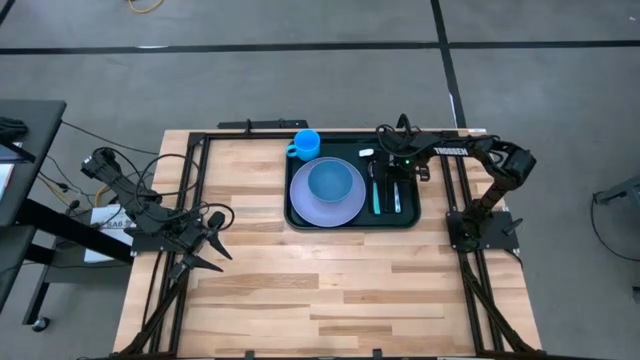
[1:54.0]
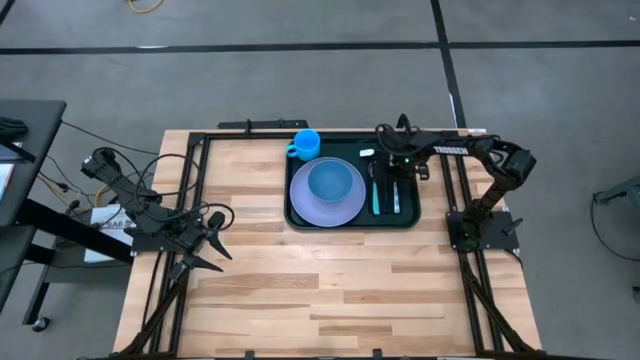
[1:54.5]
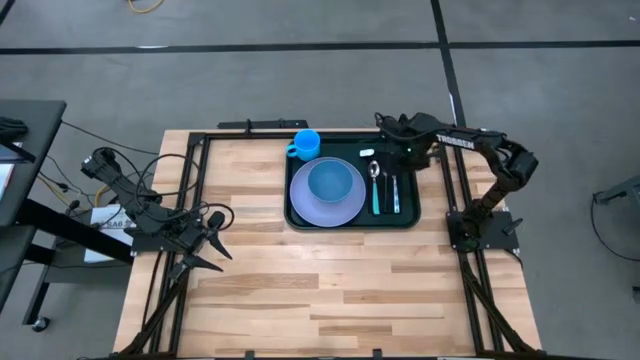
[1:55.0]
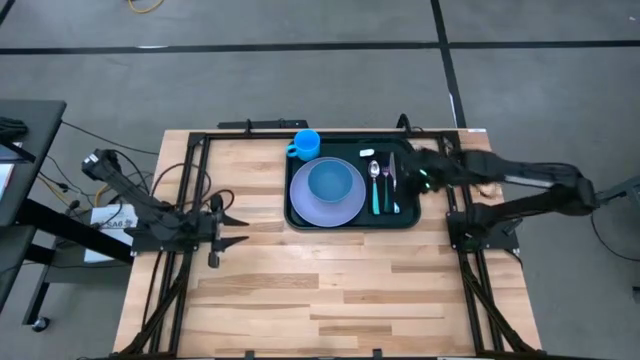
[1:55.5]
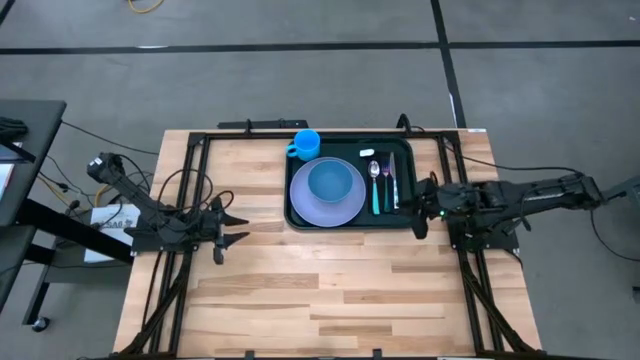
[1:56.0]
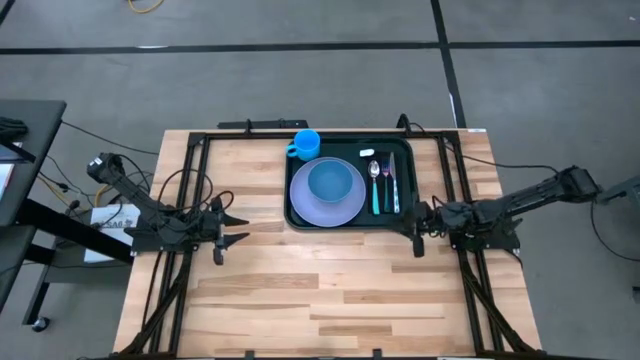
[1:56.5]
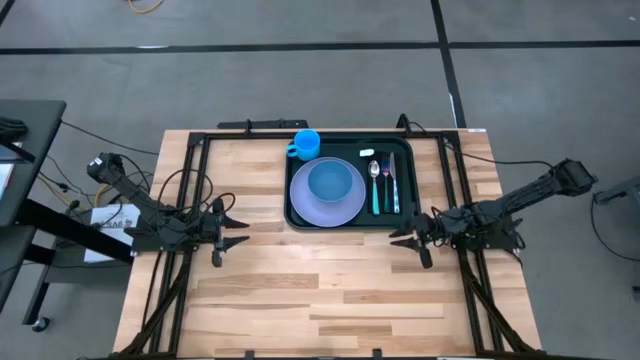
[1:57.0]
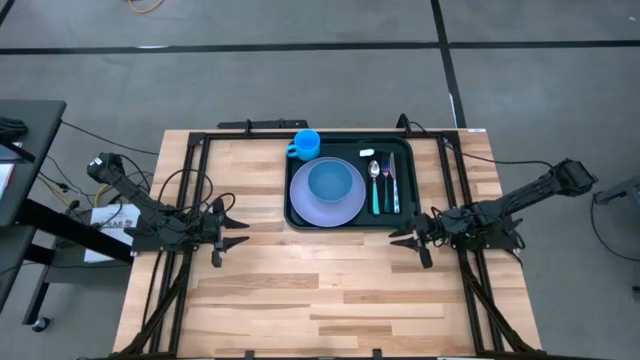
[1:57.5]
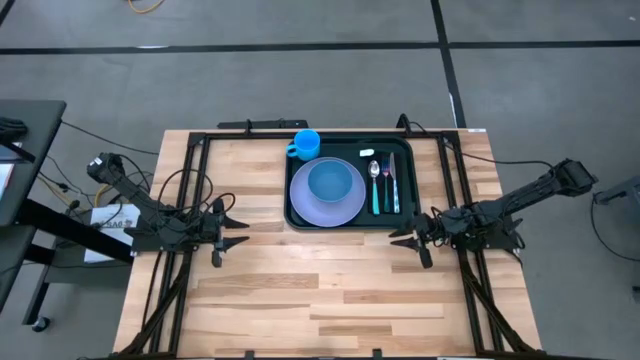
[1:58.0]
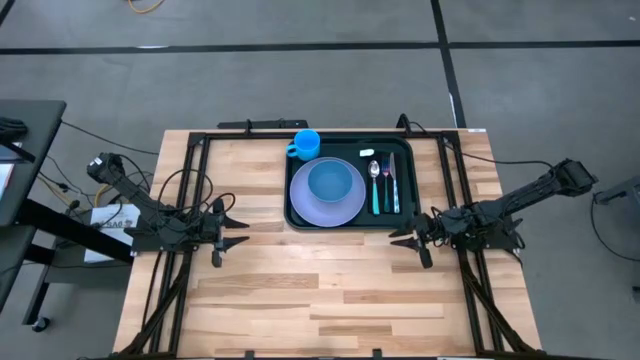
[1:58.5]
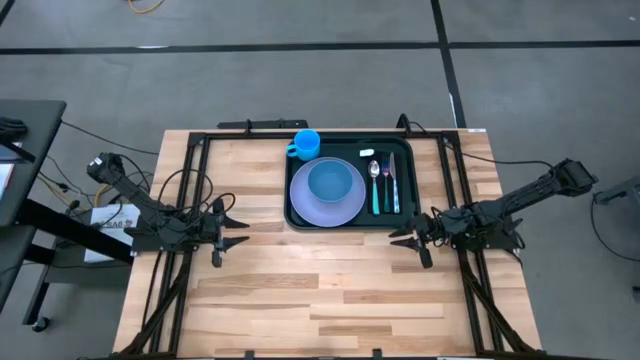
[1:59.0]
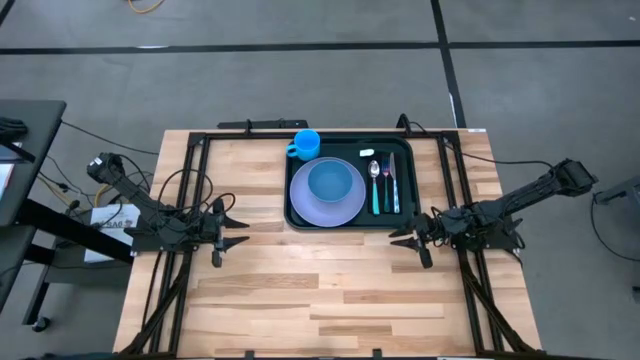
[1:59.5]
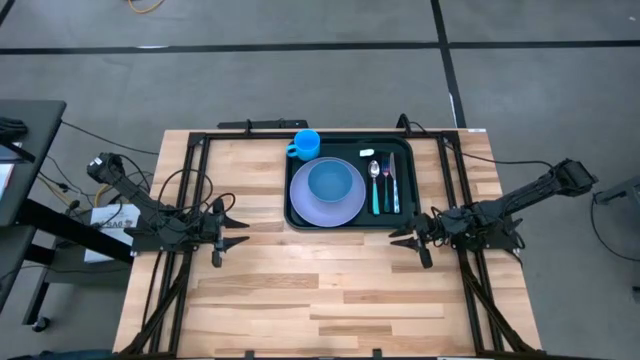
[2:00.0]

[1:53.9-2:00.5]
Task: Set up tray
Return to Home Position

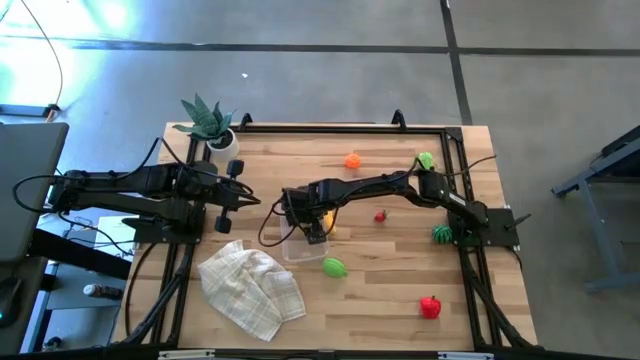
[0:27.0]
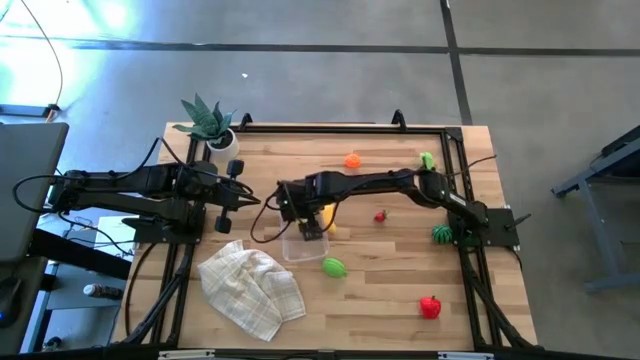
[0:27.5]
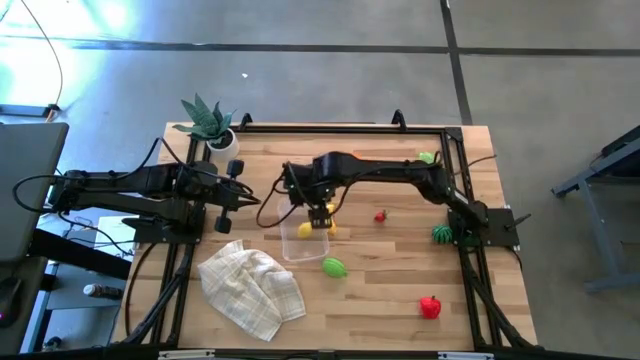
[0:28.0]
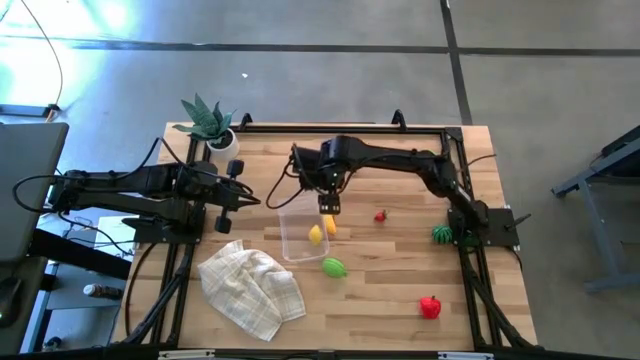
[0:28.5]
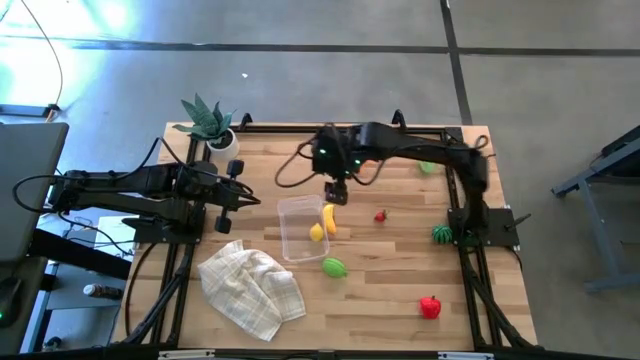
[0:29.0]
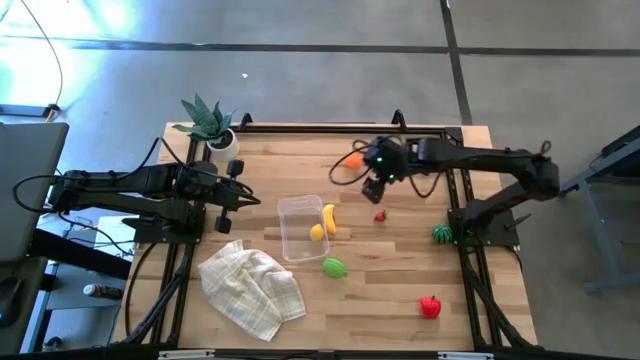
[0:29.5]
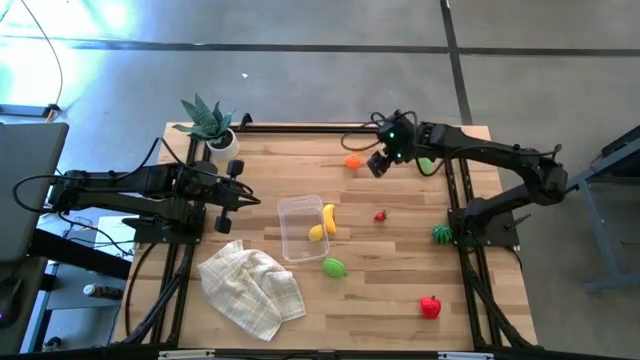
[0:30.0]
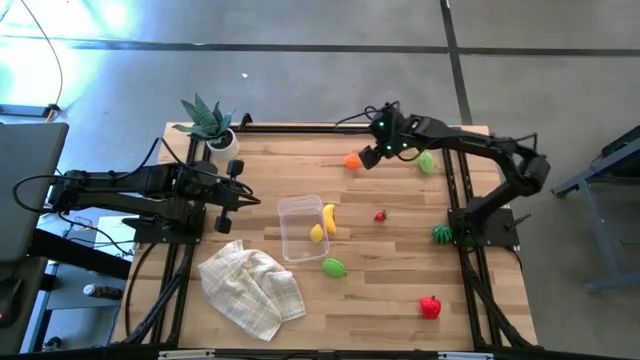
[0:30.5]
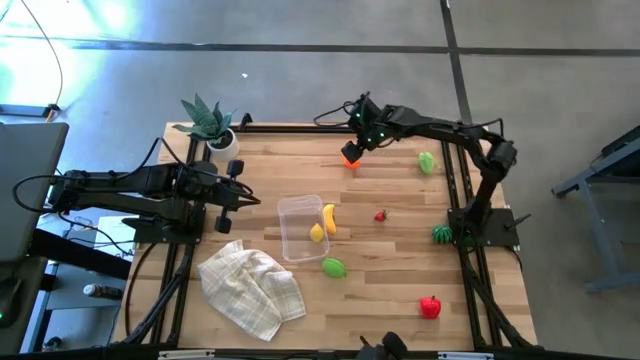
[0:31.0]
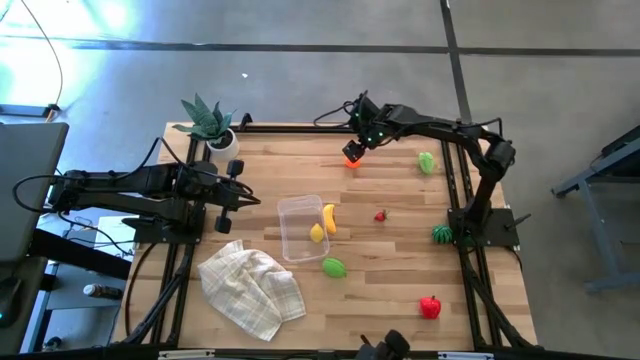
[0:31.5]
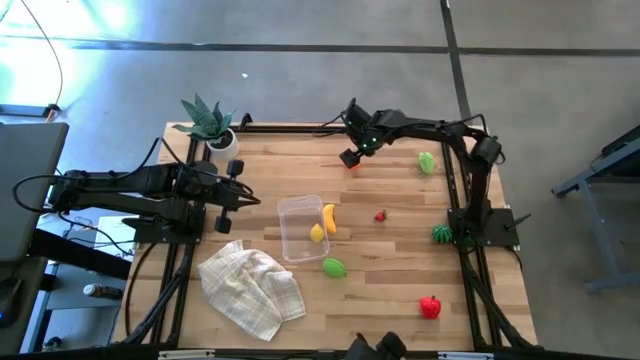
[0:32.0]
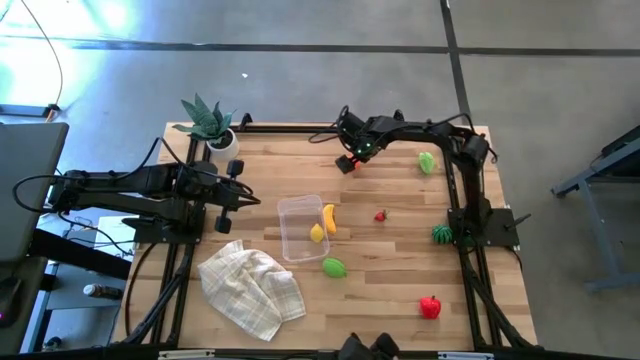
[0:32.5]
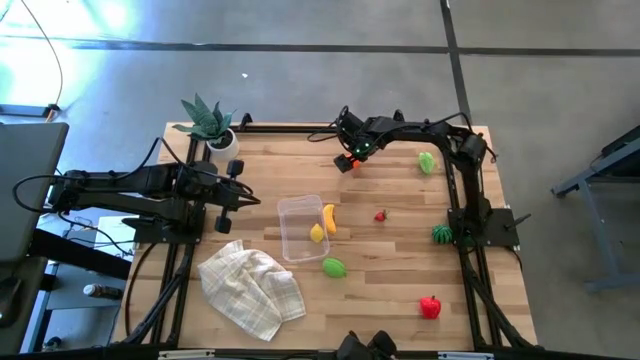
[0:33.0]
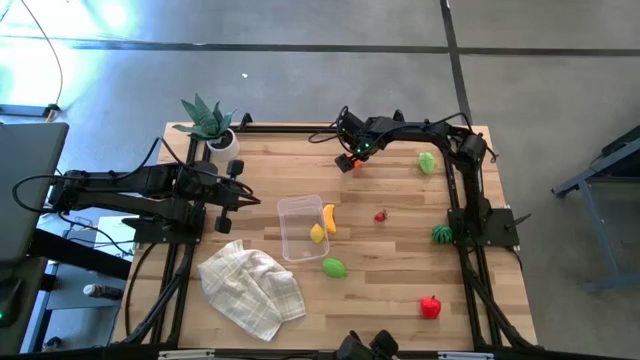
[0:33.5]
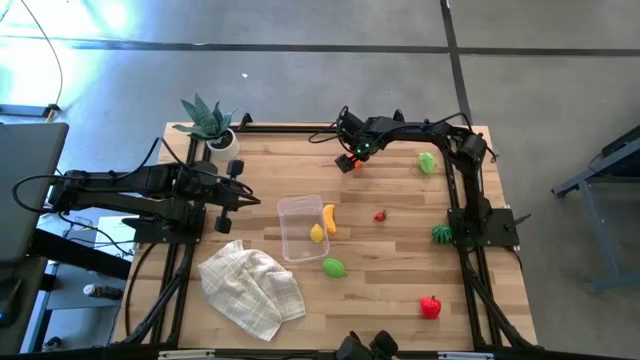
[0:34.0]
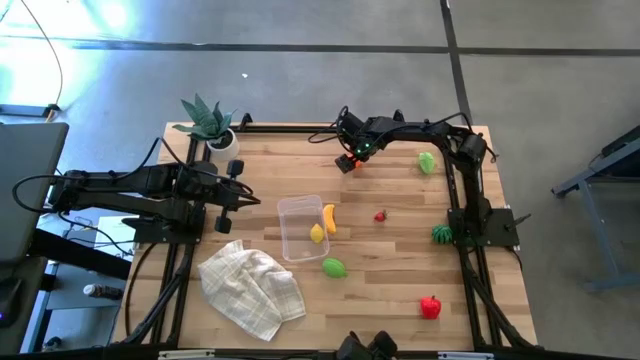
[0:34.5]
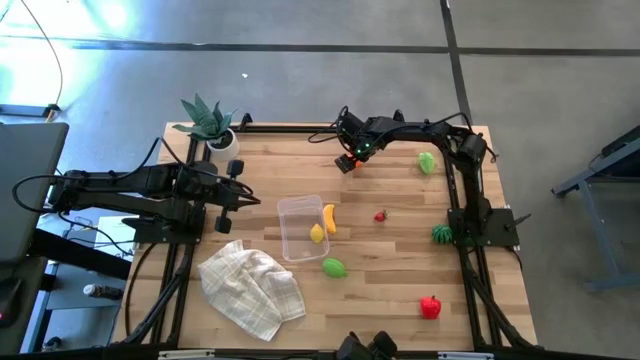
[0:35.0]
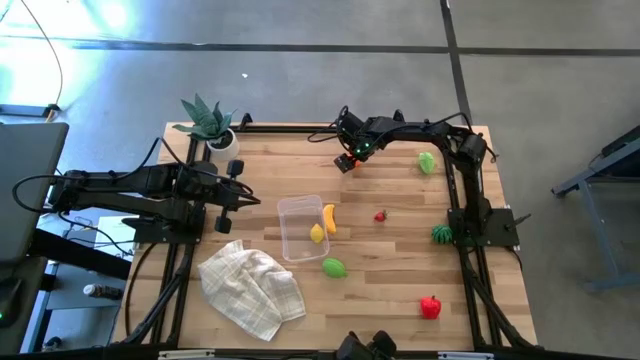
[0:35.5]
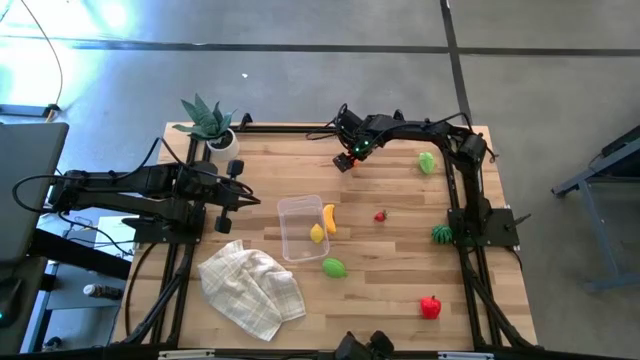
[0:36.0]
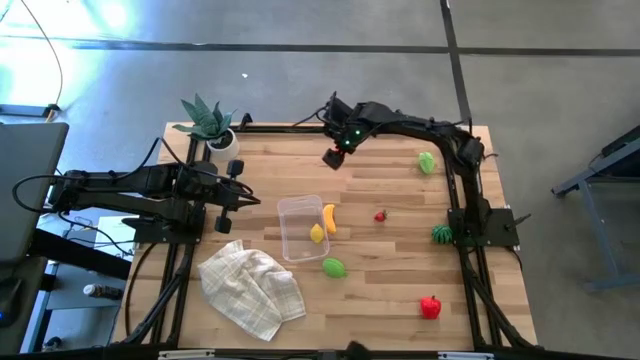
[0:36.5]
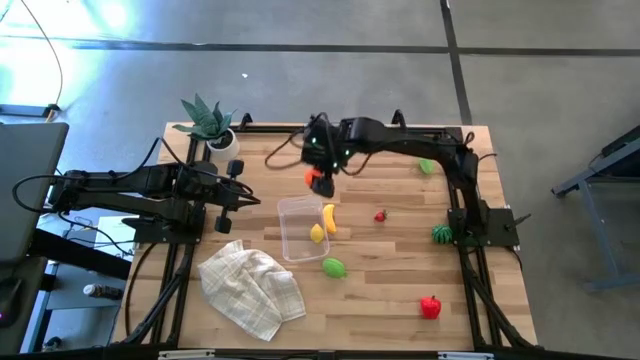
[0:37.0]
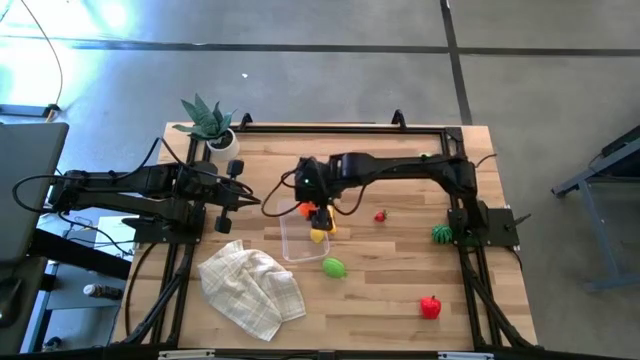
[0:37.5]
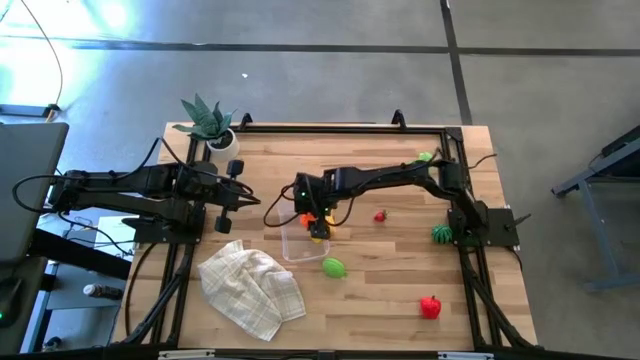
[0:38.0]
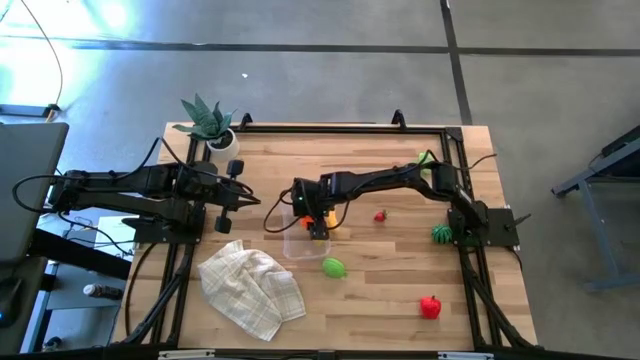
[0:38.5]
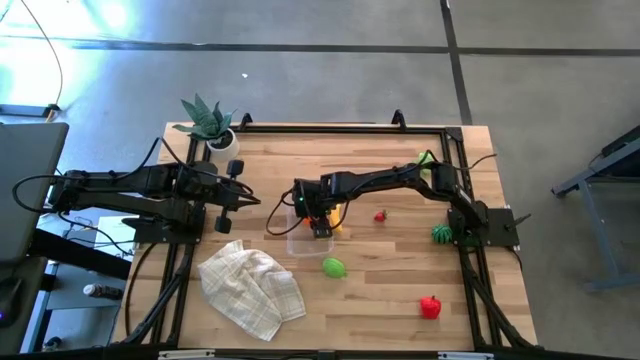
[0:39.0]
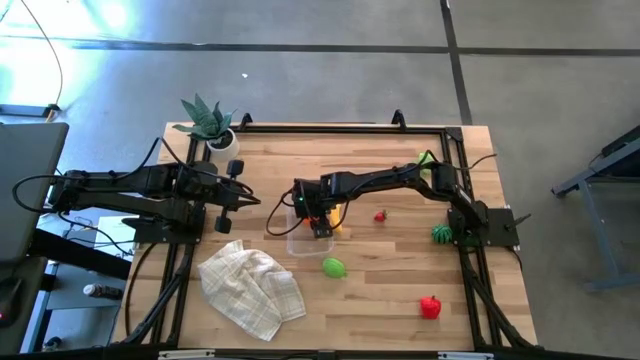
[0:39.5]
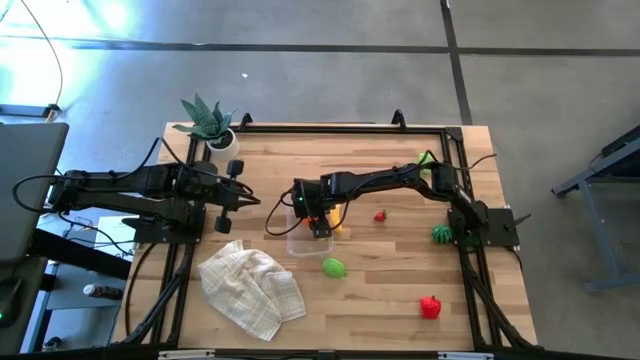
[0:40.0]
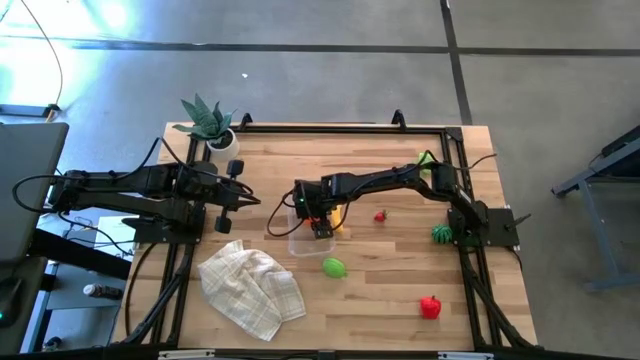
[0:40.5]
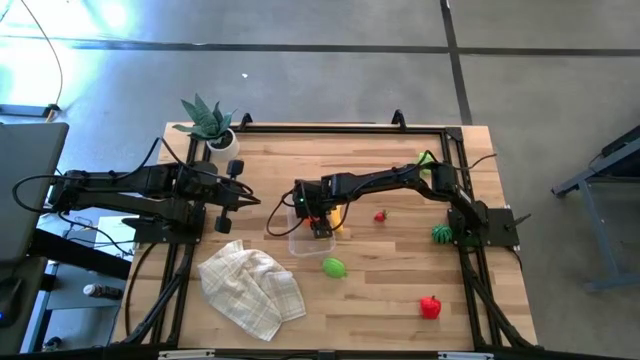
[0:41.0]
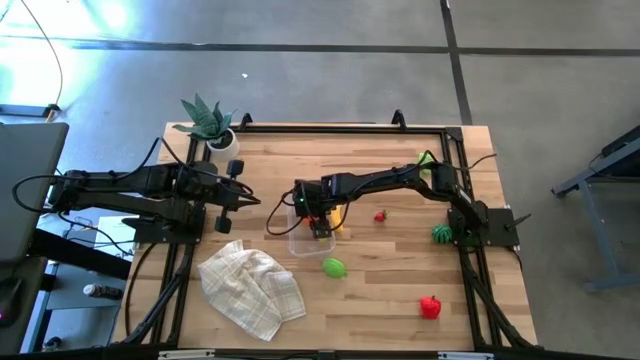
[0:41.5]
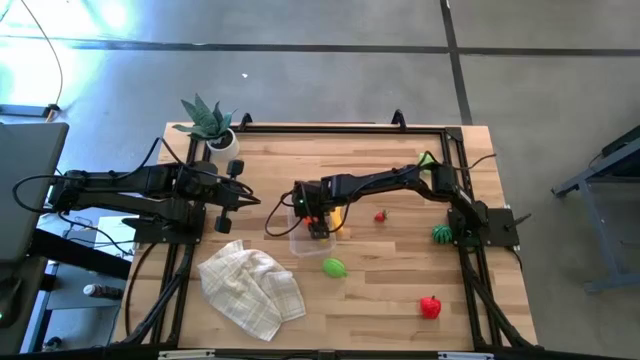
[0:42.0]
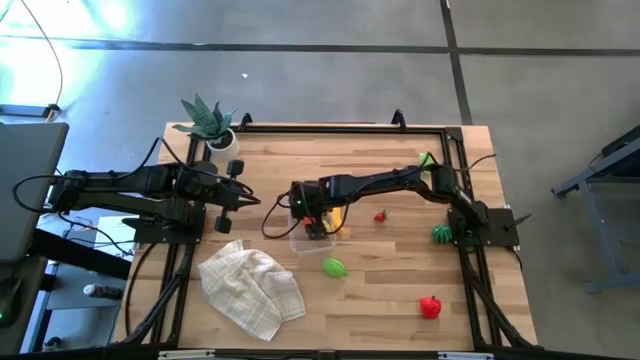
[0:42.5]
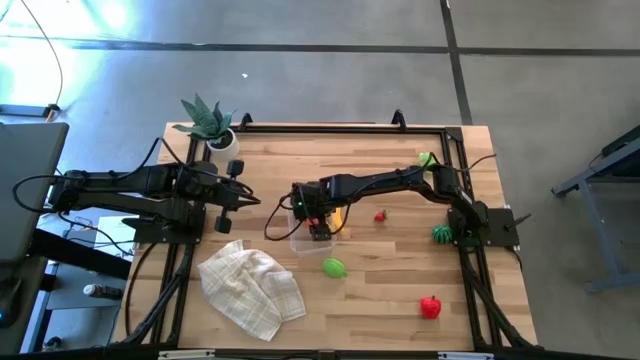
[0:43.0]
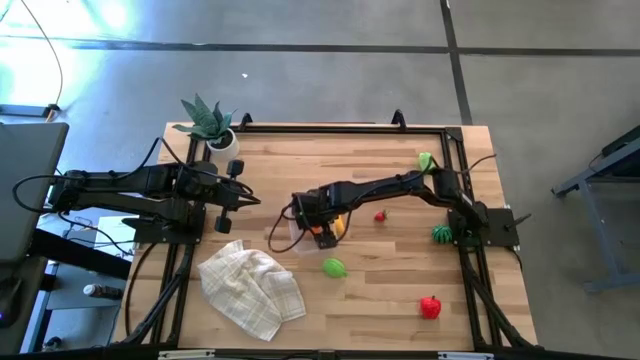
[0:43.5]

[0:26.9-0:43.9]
Task: Pick and placing Produce into tupperware
Put the orange pumpkin into the transparent bin
